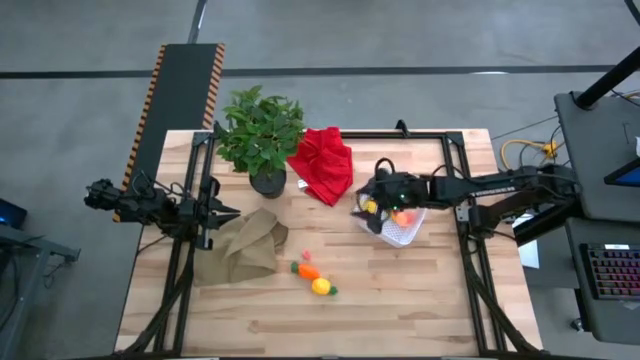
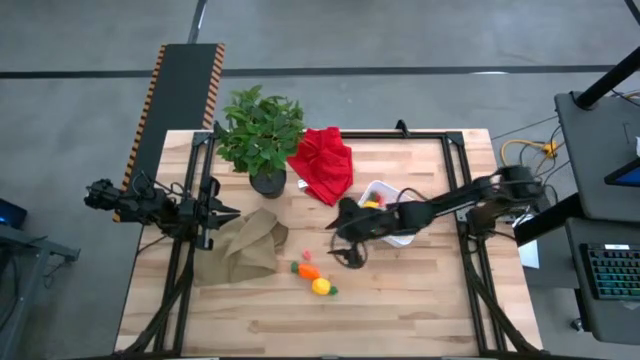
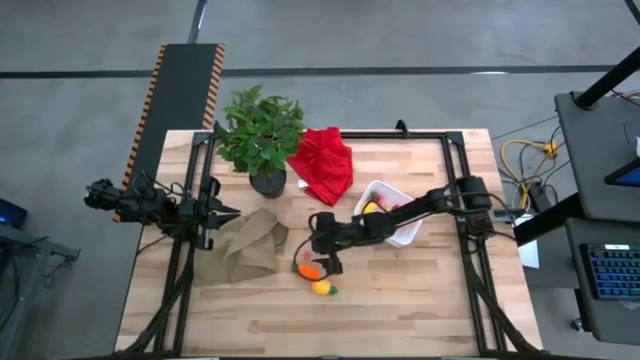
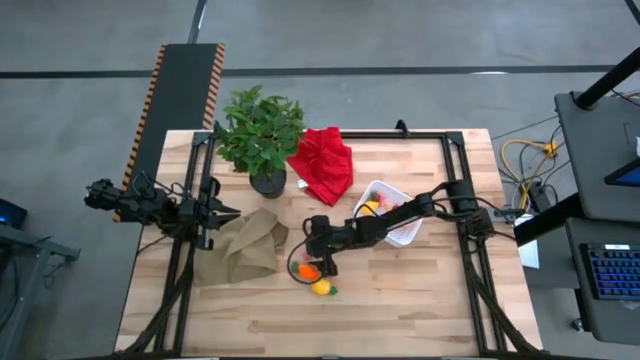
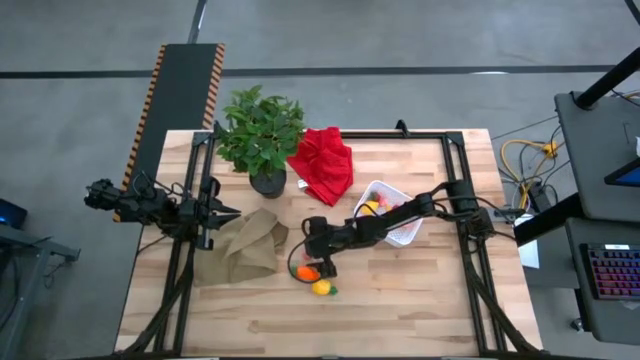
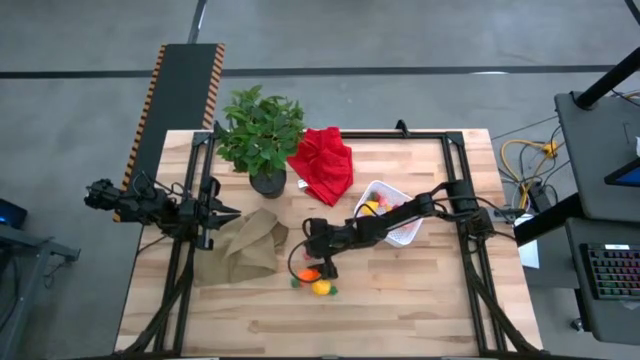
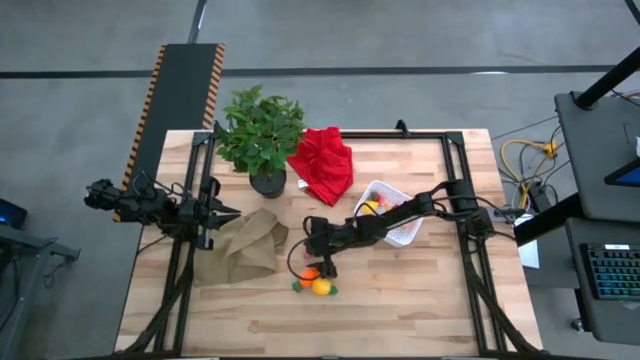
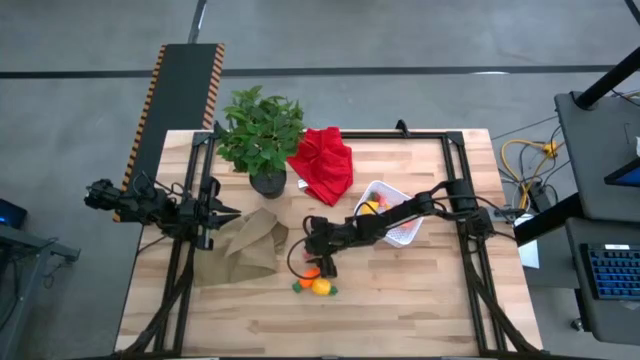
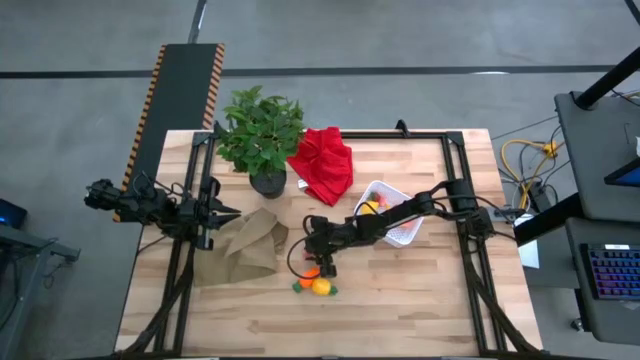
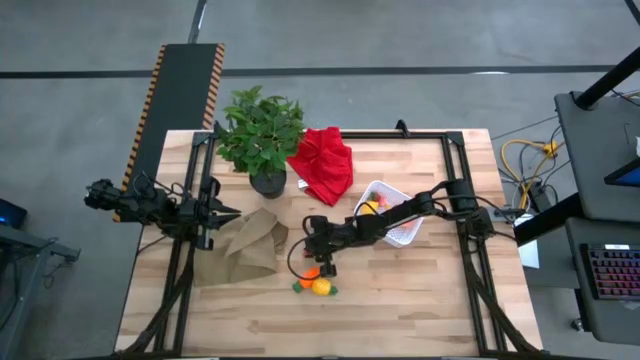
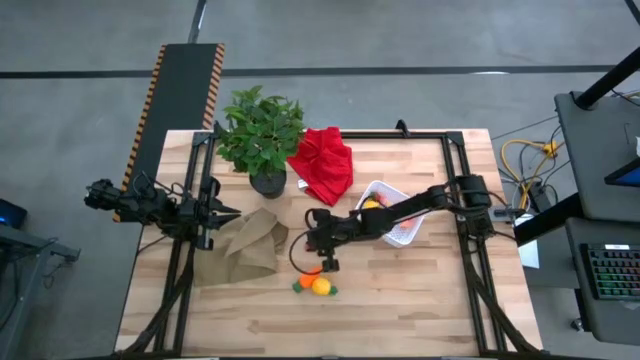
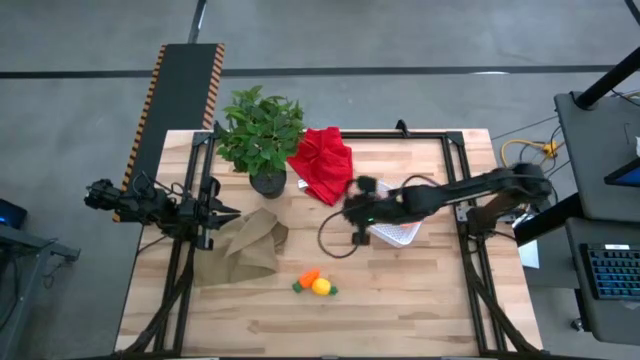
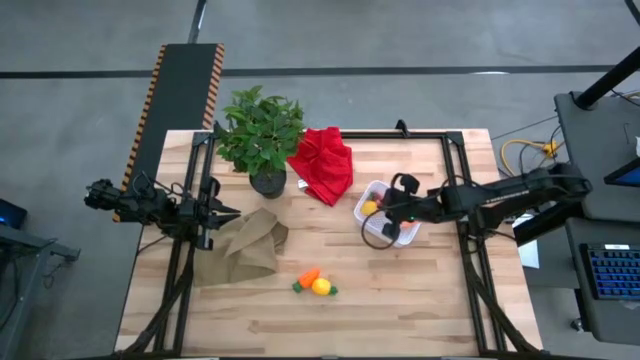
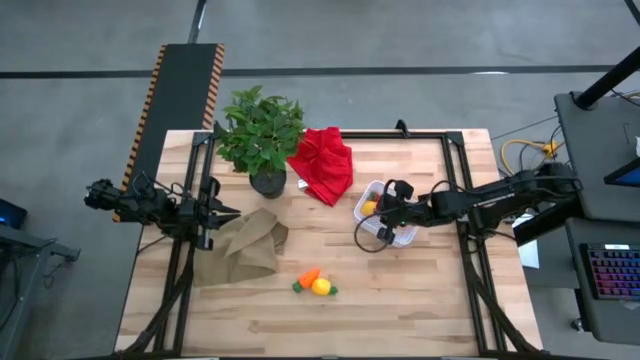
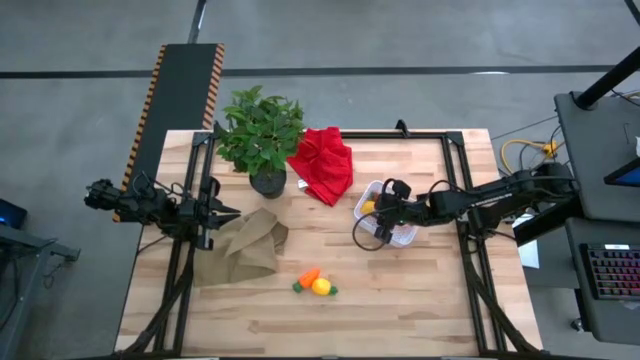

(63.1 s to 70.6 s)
Task: Pick and placing Produce into tupperware
Put the pink apricot into the white bin

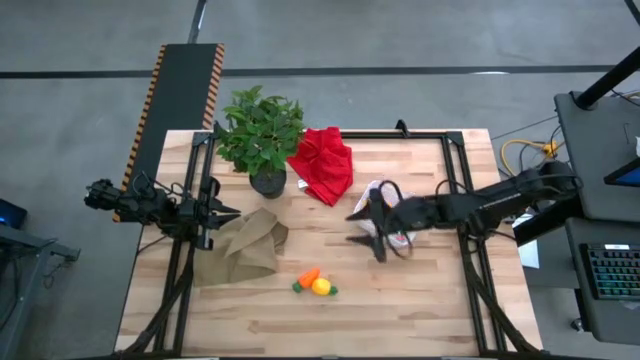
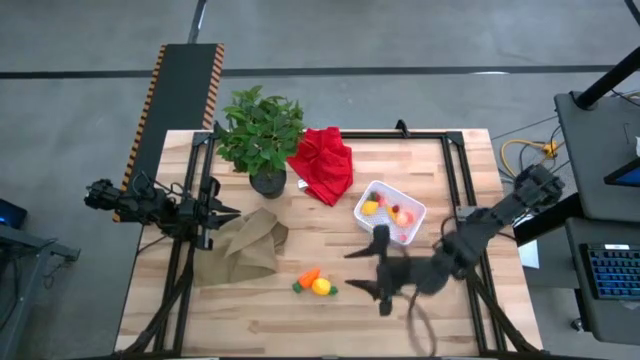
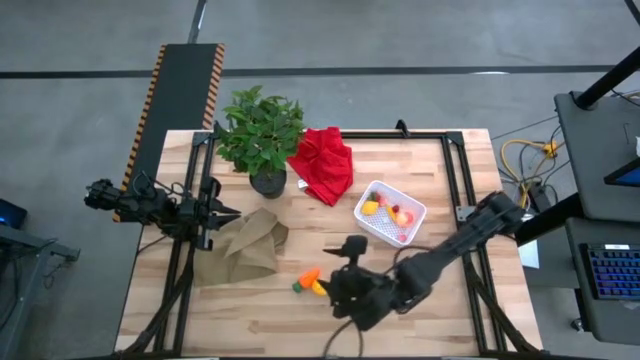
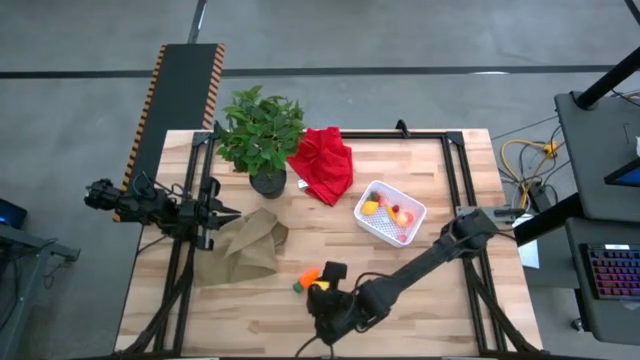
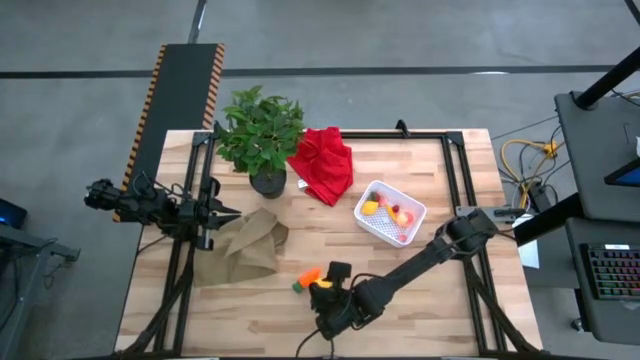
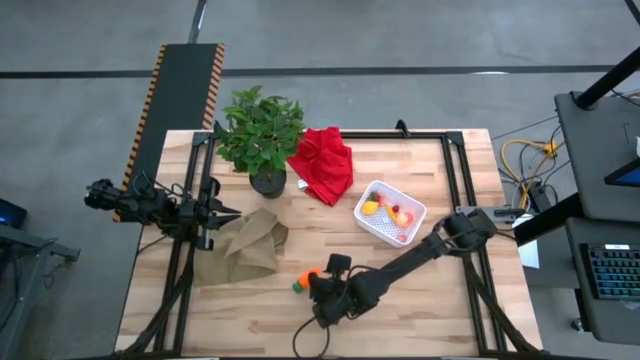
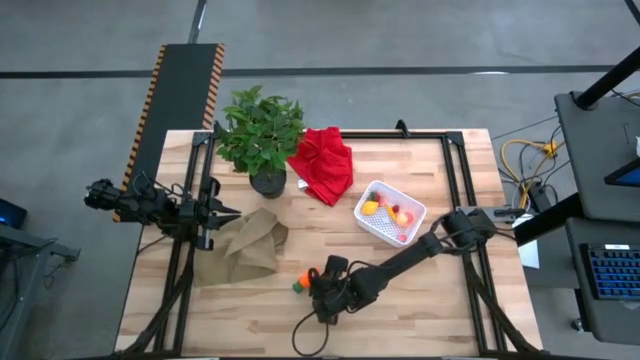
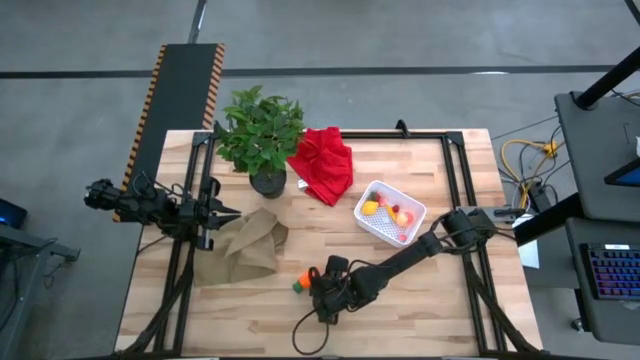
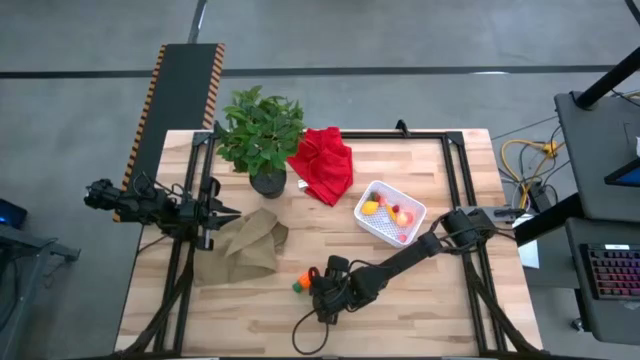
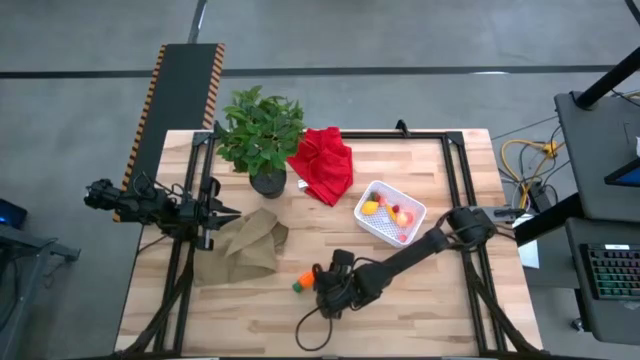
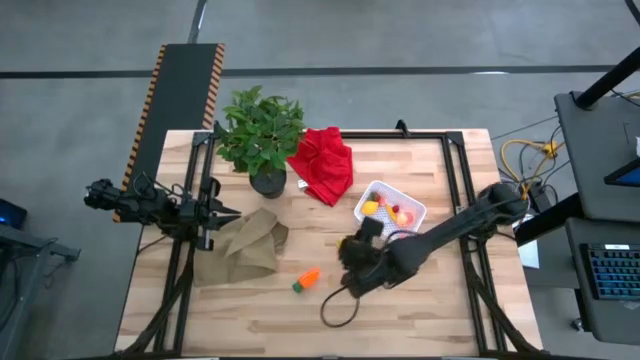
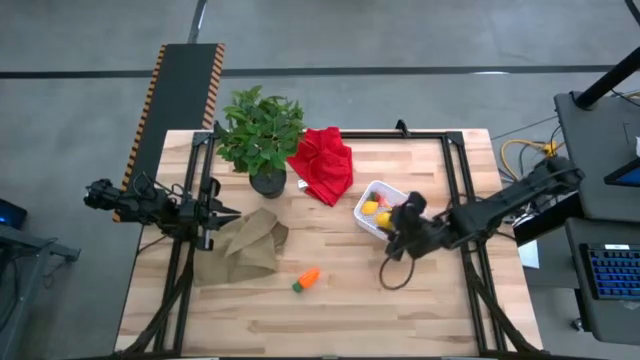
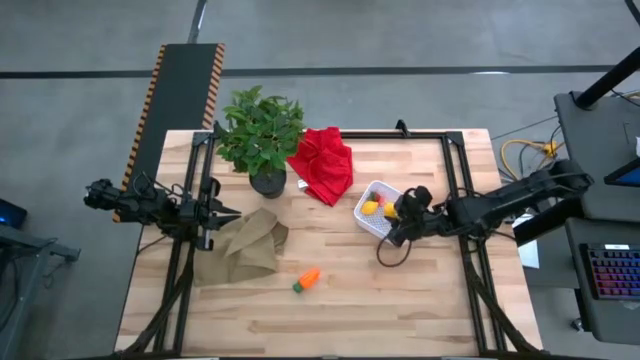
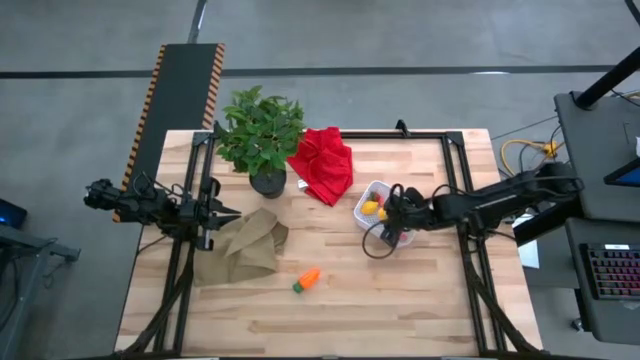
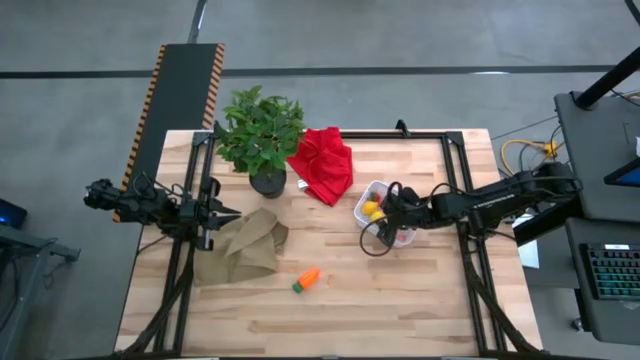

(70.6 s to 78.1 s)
Put the yellow pineapple into the white bin

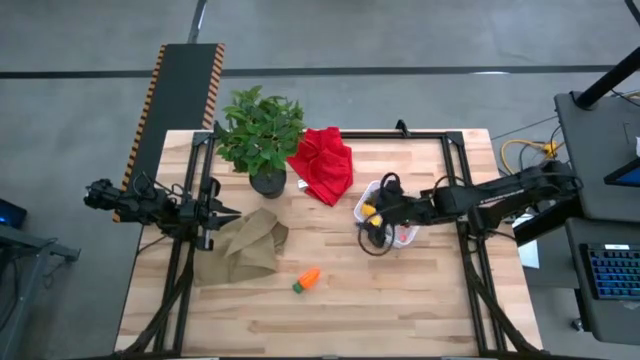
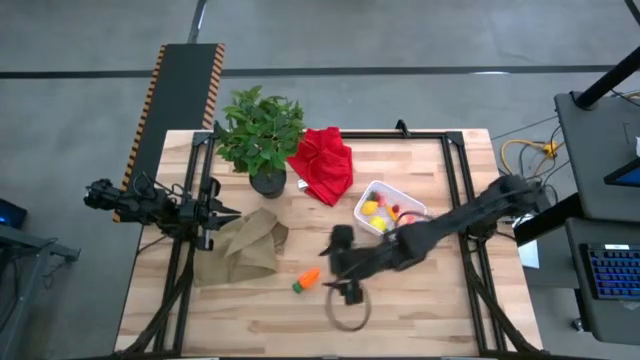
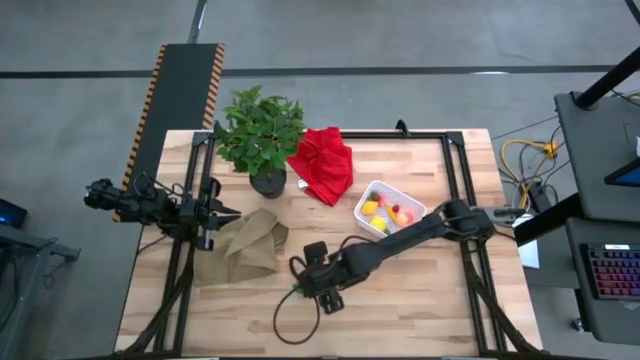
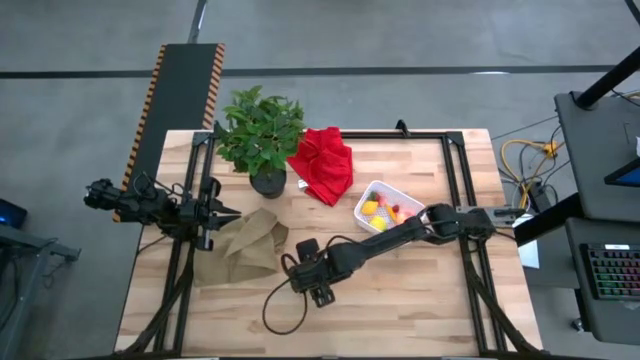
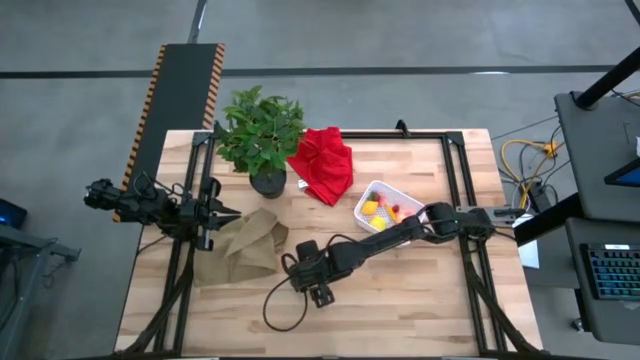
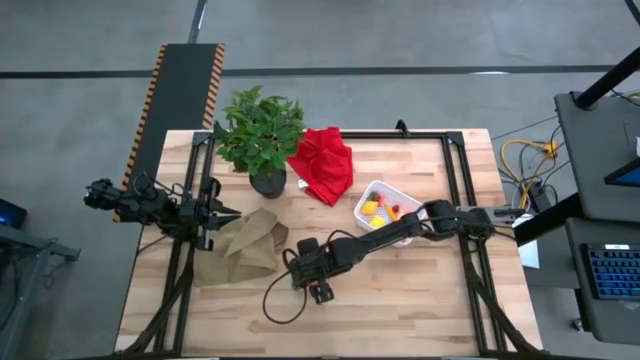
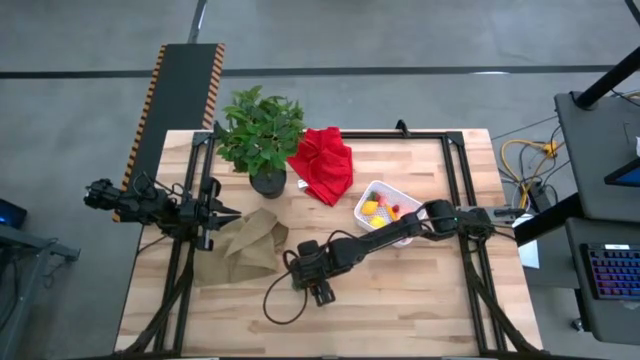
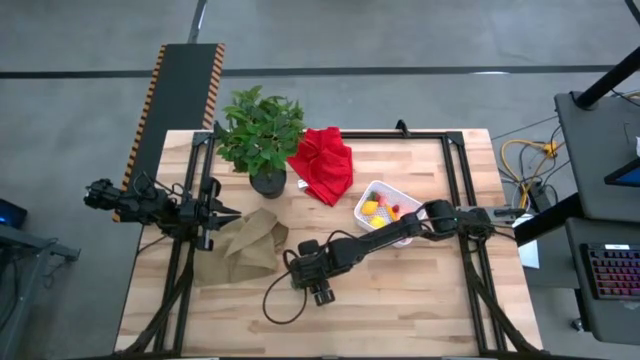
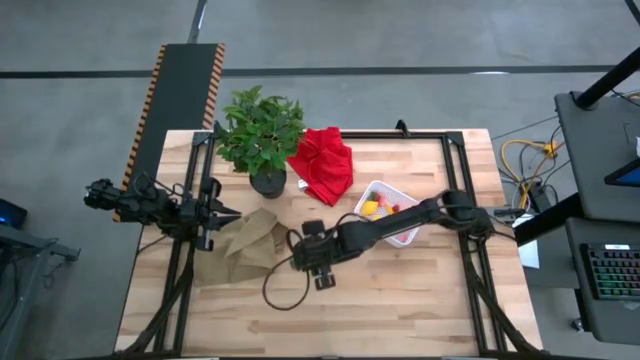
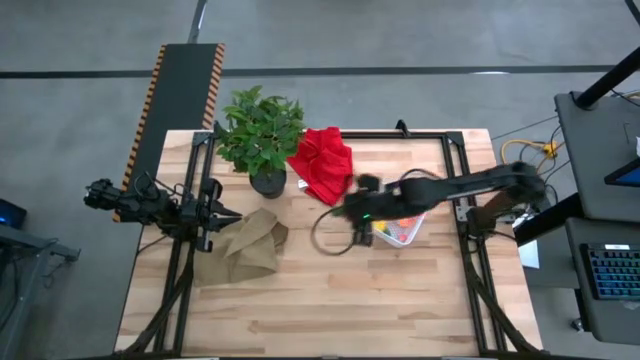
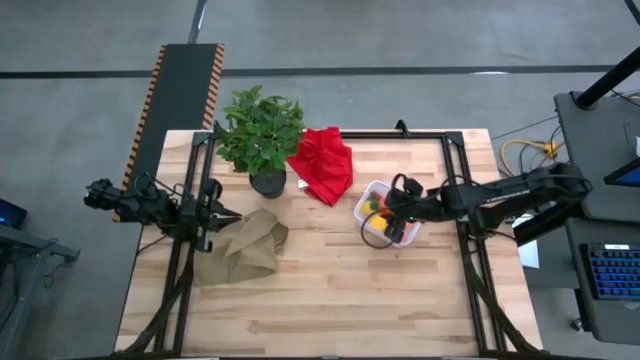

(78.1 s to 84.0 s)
Put the orange carrot into the white bin

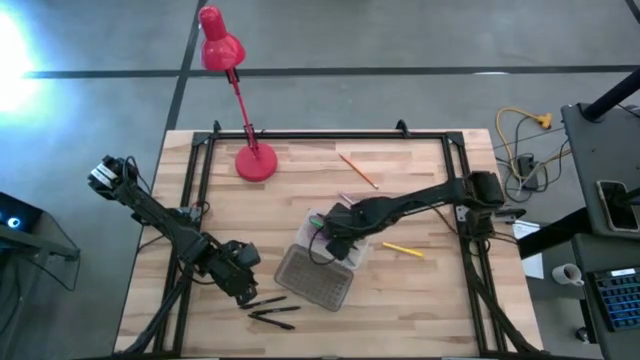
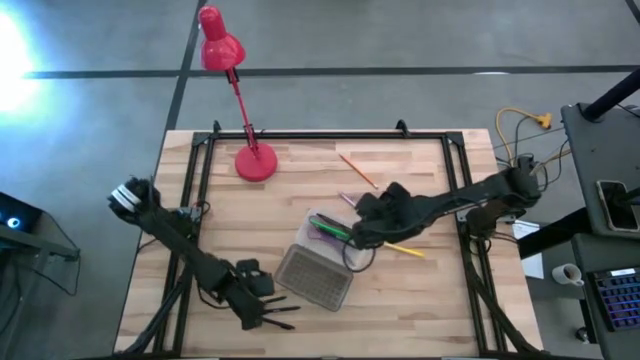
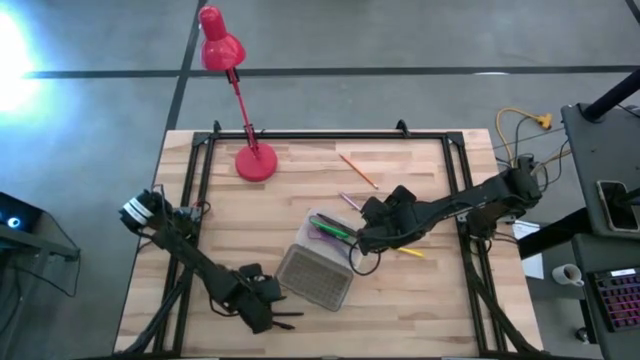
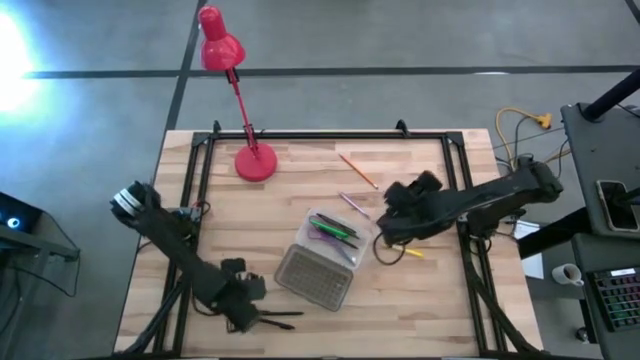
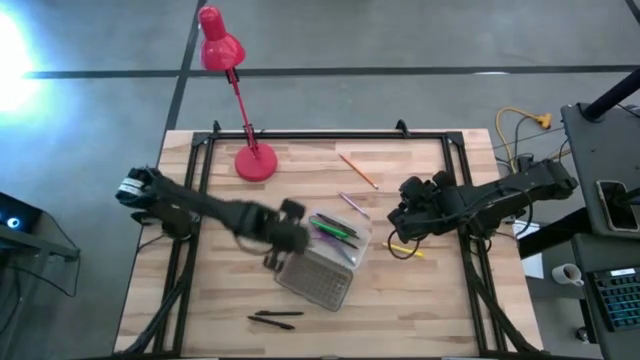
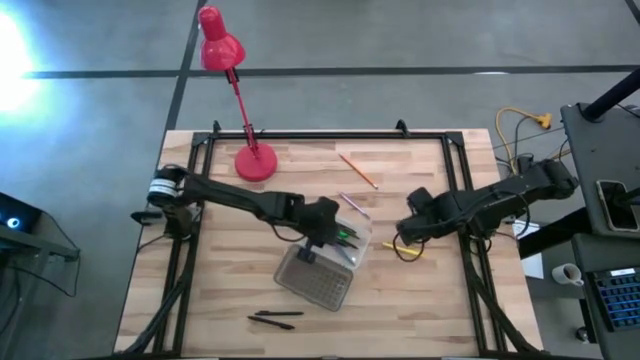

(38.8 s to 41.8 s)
Task: Pick & place school supplies into a supply box
Put the black pen into the supply box
